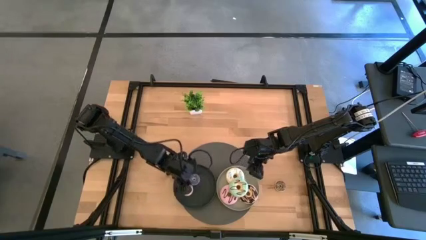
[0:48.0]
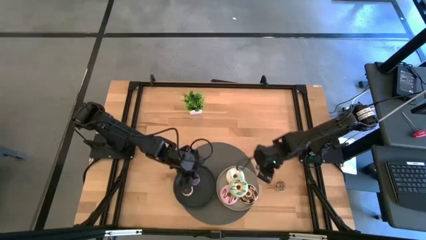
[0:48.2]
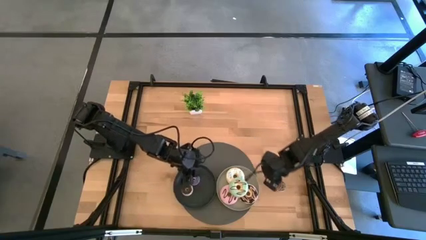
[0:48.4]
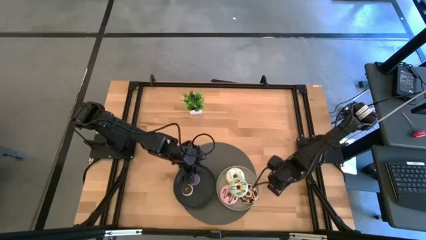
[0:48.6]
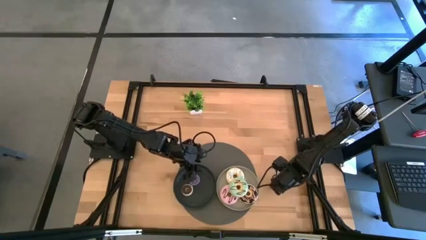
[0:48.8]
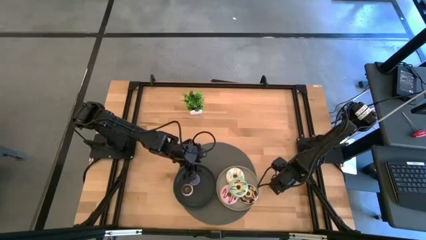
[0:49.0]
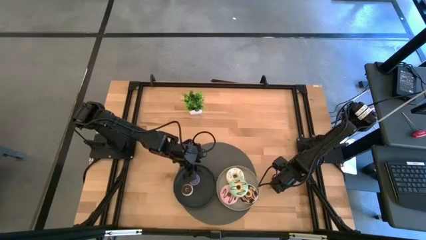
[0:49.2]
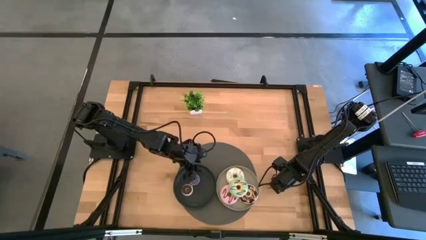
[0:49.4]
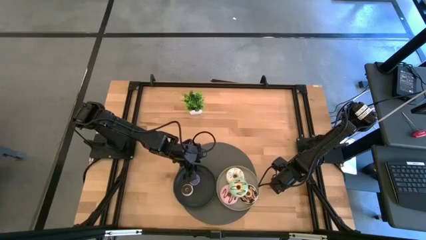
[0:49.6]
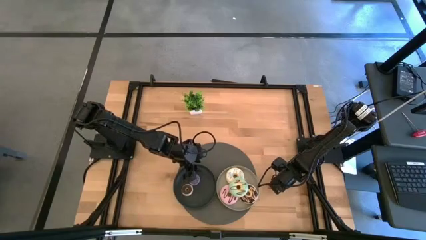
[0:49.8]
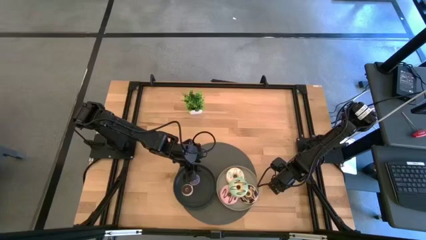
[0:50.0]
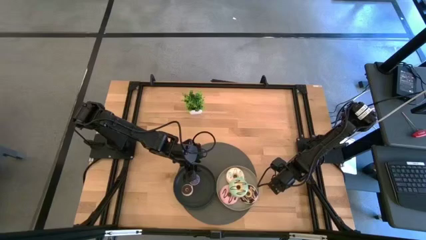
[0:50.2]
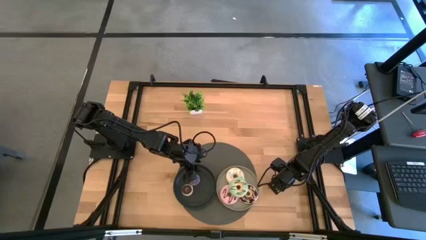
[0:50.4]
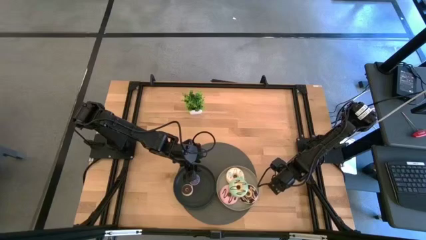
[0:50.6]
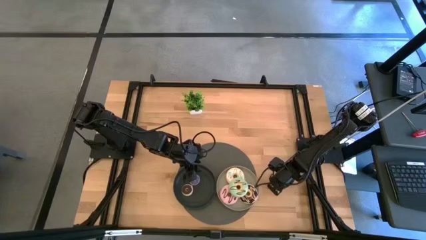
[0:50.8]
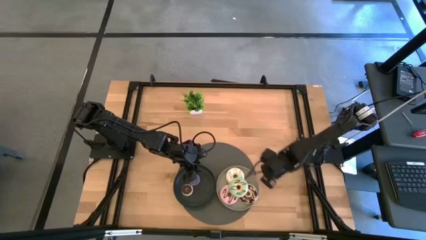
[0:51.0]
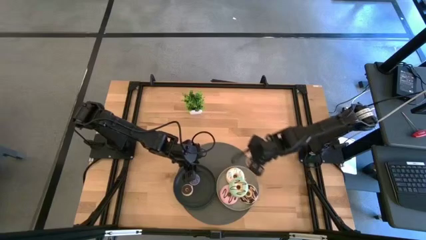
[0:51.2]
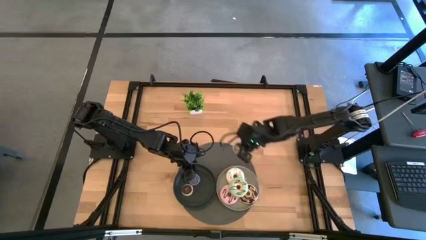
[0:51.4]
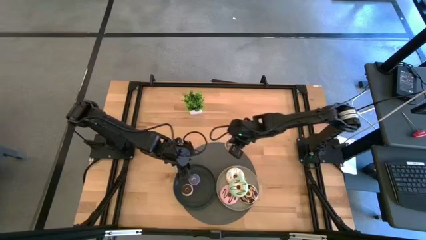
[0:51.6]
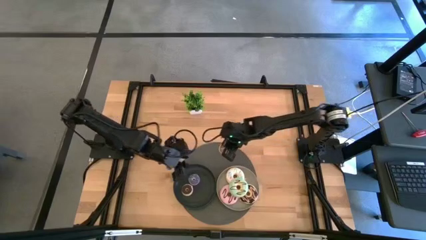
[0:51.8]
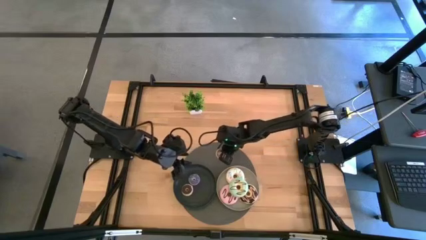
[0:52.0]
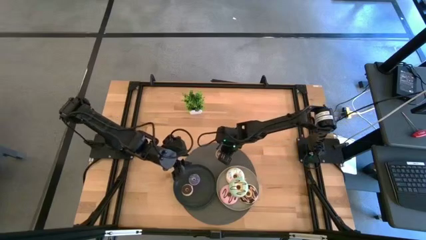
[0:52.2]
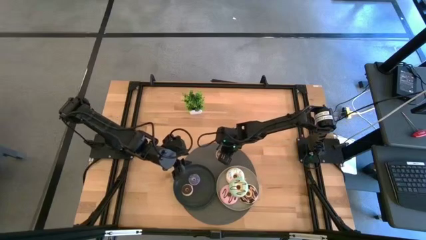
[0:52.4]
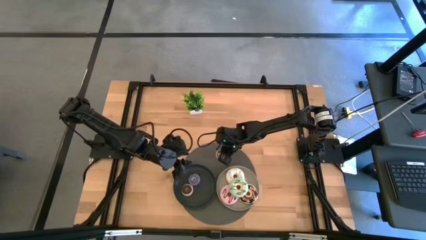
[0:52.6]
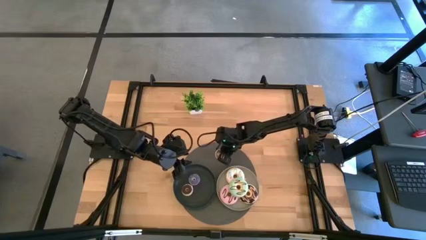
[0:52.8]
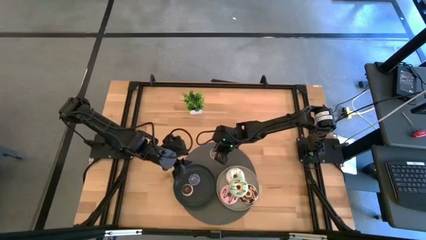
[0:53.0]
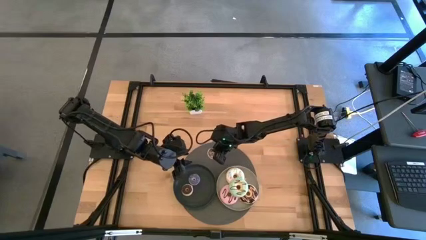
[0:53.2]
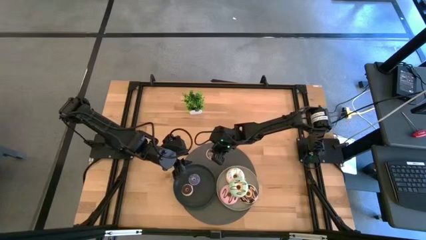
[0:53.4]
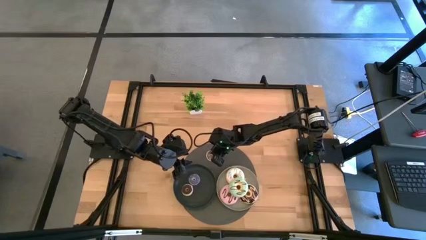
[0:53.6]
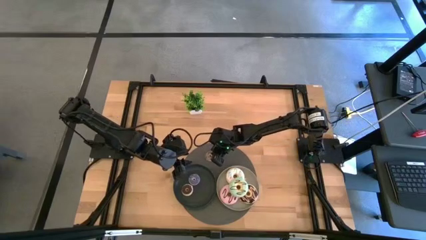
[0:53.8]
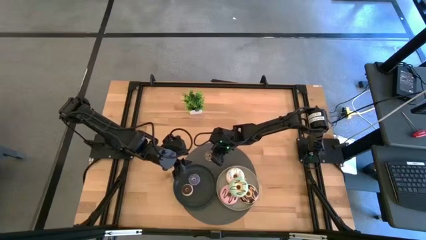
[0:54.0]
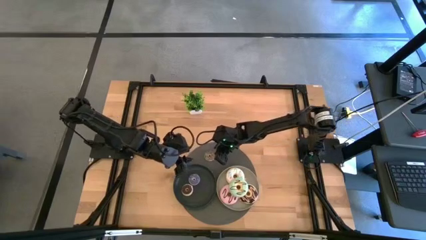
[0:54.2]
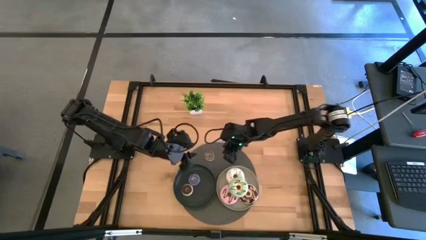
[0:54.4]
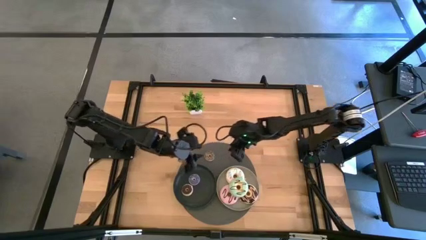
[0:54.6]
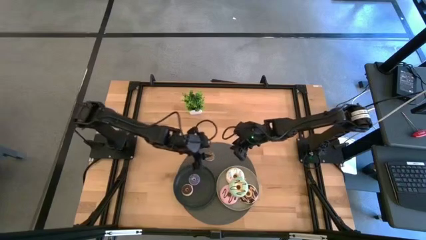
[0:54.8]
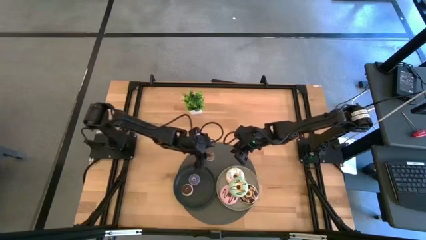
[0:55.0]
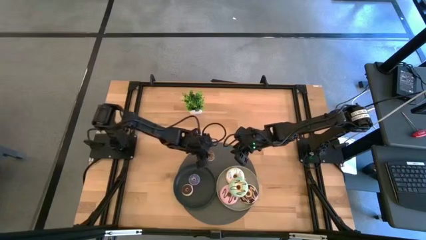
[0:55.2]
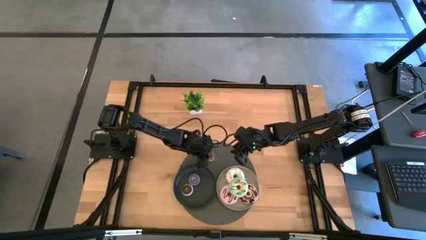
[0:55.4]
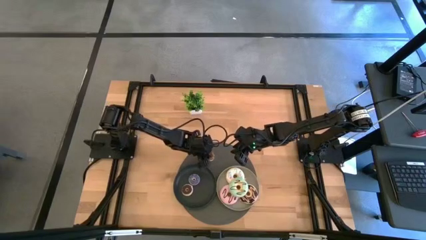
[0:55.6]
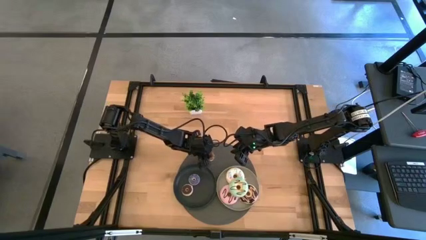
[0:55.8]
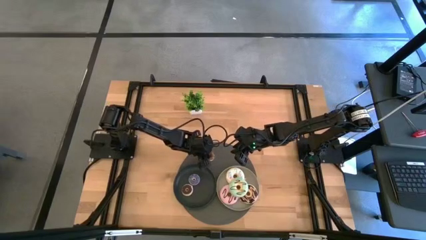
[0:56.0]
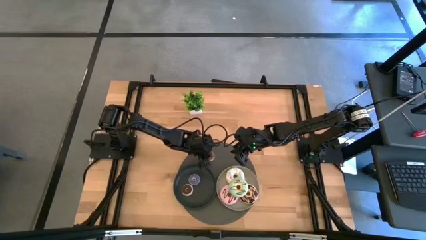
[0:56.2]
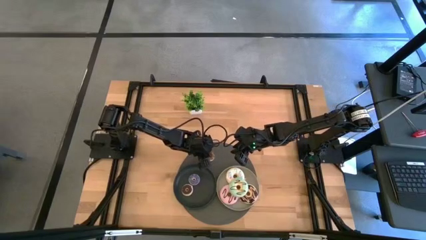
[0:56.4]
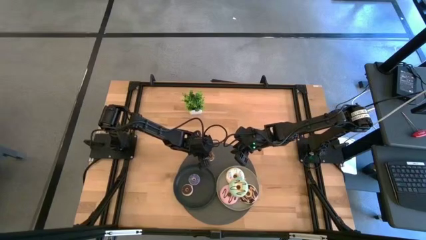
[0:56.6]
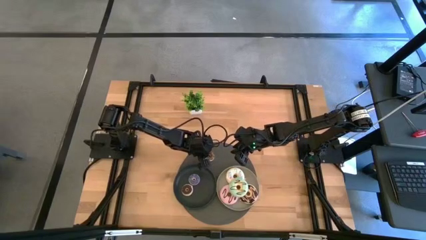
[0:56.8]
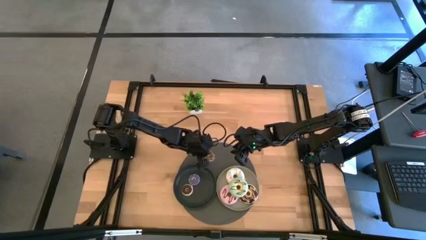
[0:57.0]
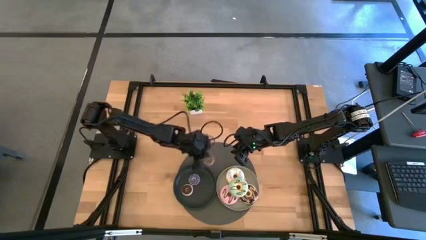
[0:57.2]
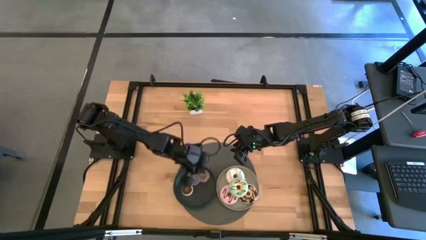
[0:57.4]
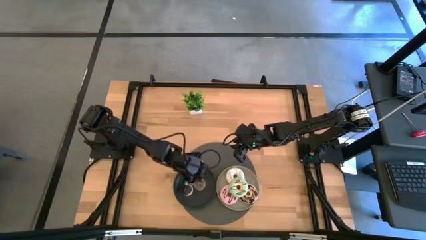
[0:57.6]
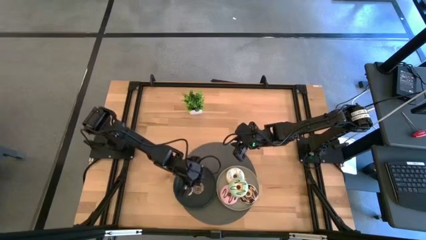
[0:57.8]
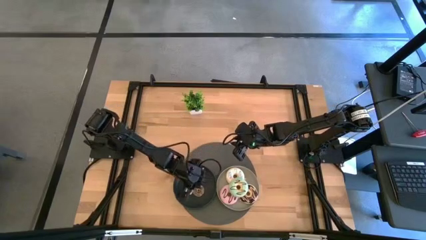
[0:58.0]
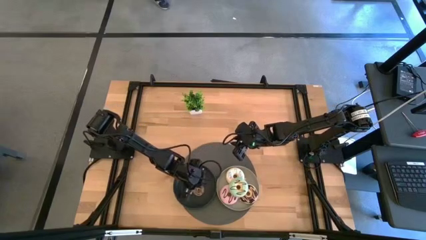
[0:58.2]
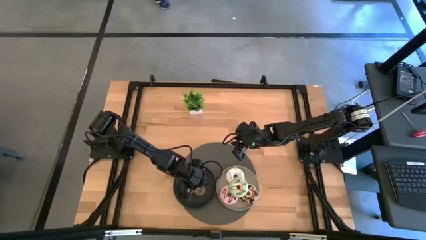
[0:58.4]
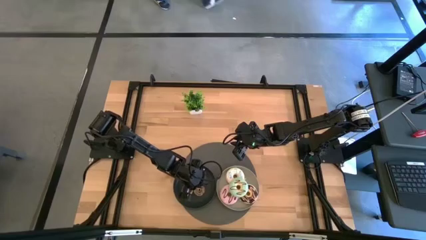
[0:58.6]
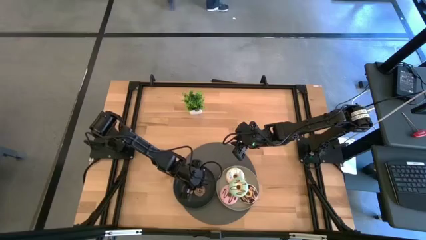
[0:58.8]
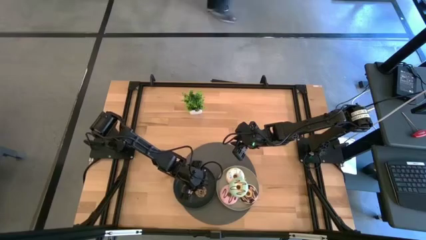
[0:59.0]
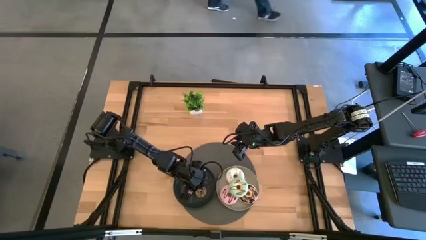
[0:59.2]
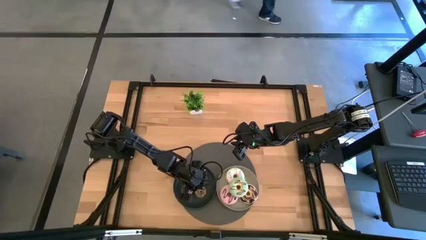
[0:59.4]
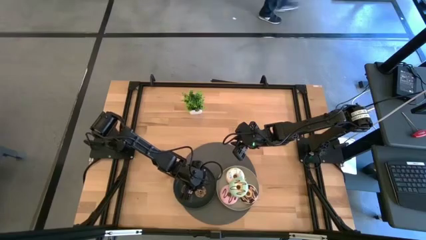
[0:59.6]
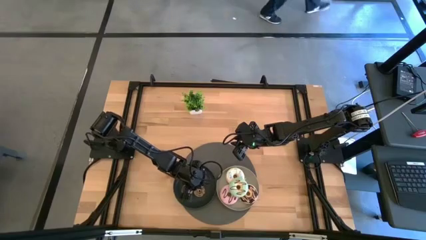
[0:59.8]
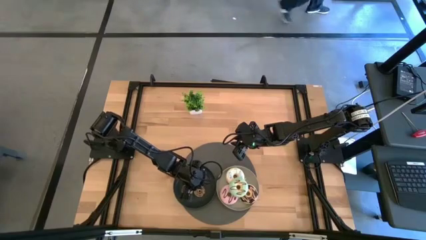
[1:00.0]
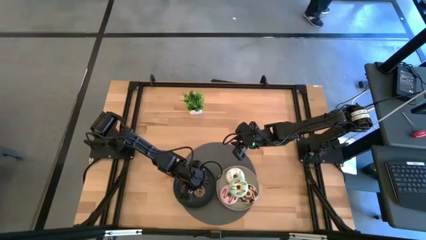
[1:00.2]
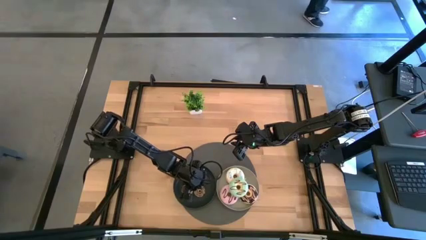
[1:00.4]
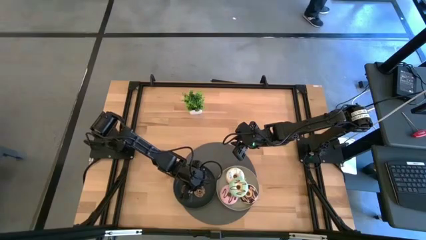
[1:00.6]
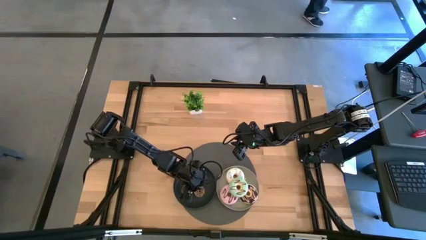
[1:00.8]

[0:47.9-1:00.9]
Task: Pick & Place donuts
Put the small brown donut on the black plate

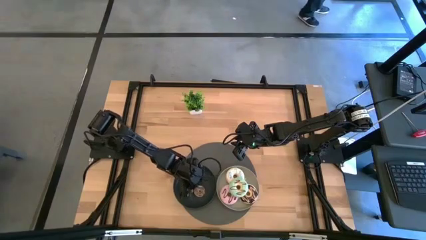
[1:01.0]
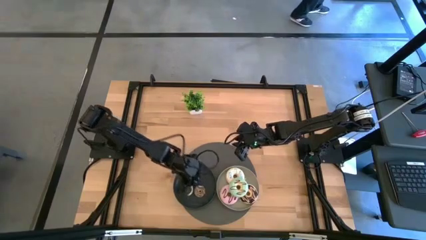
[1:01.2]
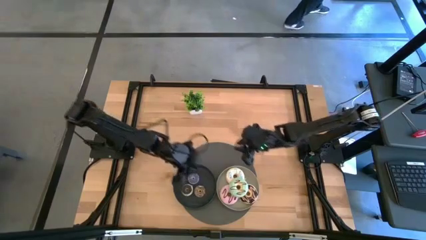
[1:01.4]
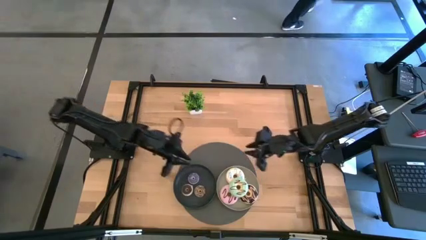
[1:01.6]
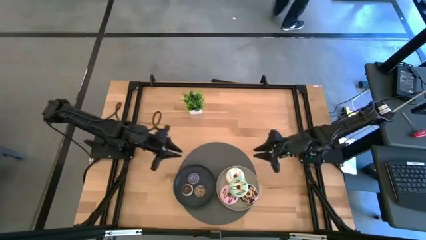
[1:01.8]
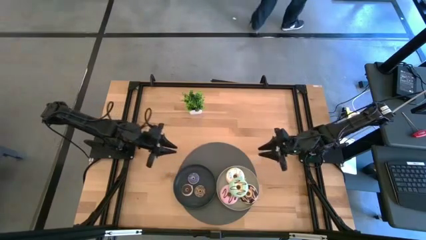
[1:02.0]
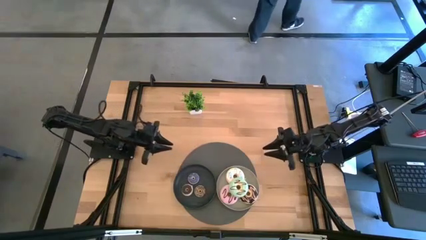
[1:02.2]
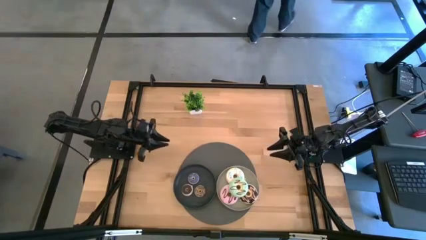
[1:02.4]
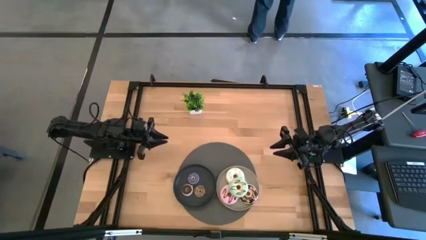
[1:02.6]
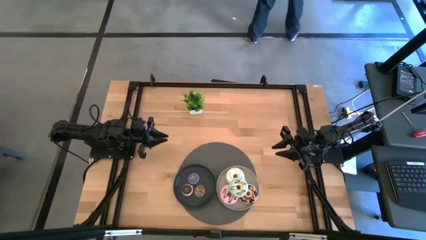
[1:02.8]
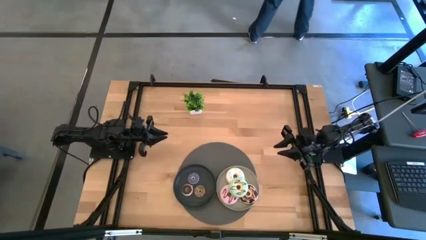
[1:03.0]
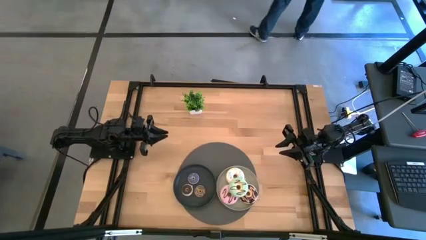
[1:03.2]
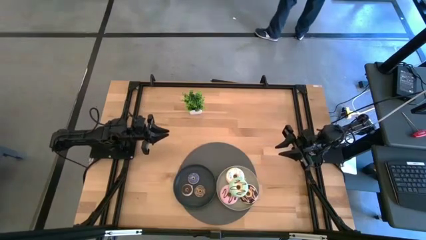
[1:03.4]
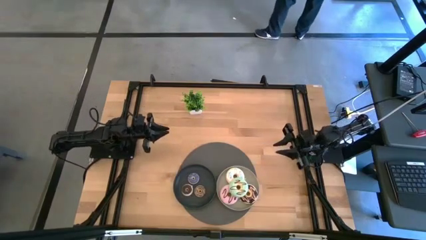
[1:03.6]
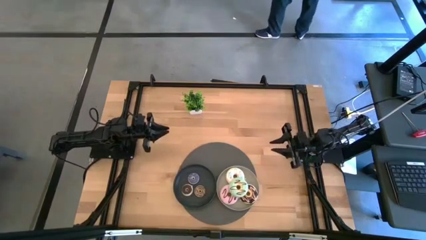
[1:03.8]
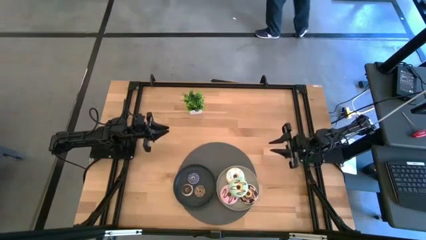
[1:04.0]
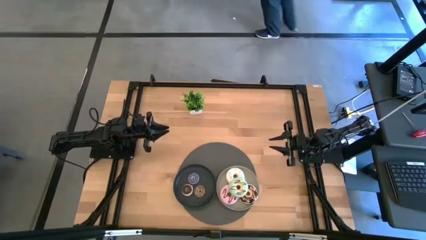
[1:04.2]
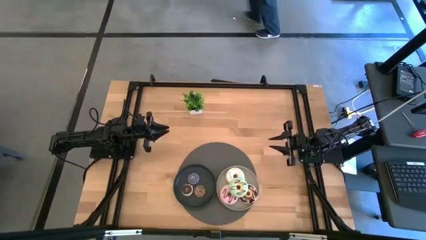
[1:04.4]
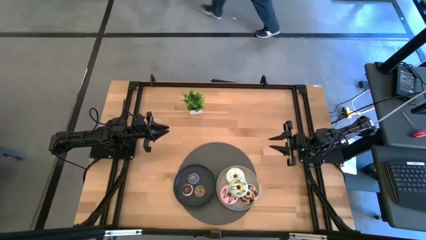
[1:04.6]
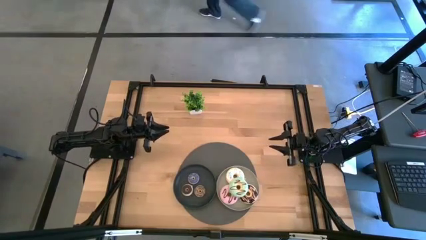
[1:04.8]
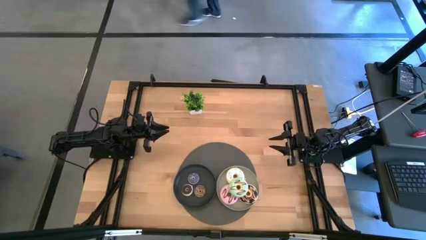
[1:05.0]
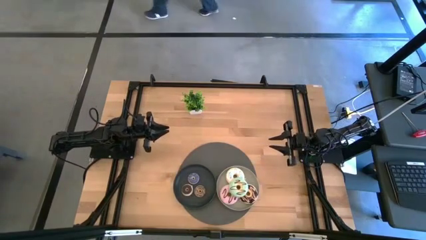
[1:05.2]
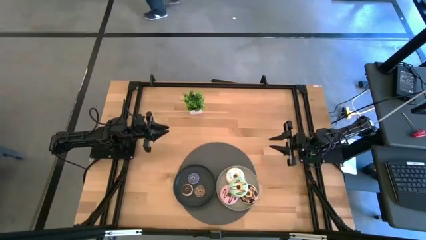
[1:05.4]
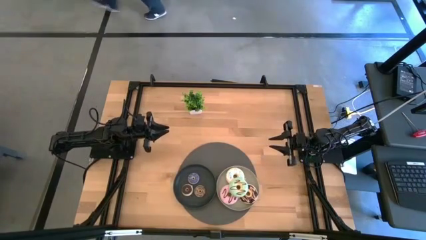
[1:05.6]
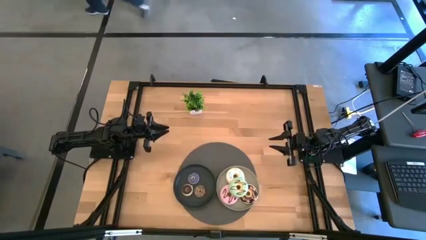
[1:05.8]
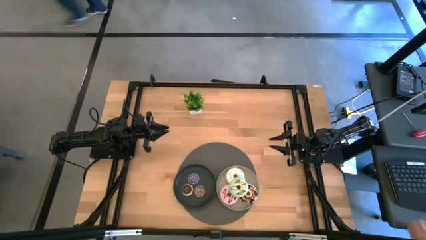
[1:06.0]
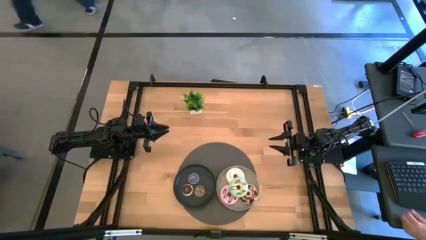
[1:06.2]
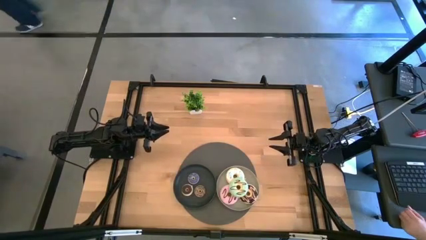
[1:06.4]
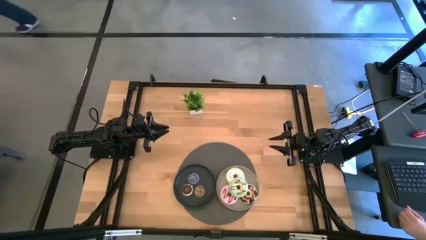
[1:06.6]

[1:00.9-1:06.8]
Return to Home Position
